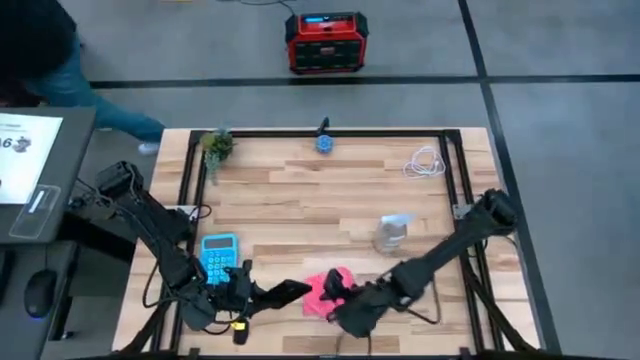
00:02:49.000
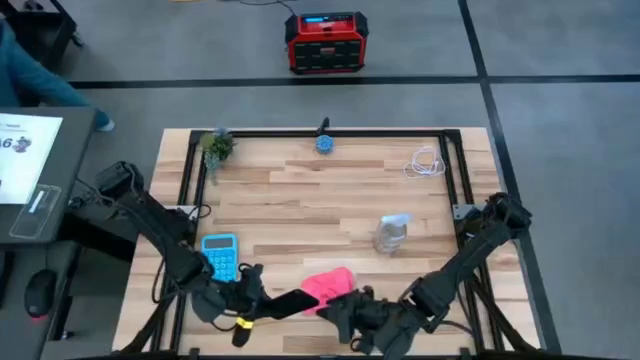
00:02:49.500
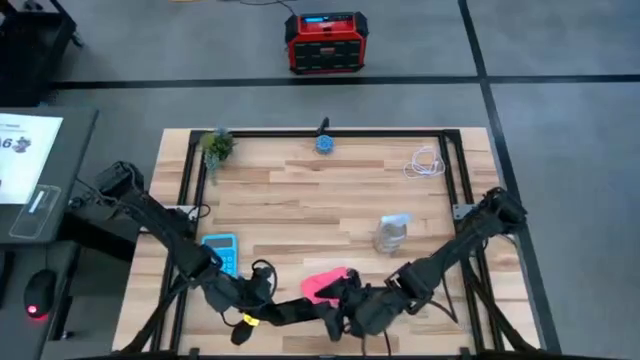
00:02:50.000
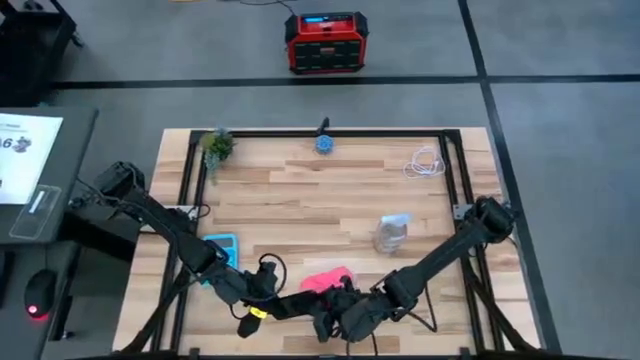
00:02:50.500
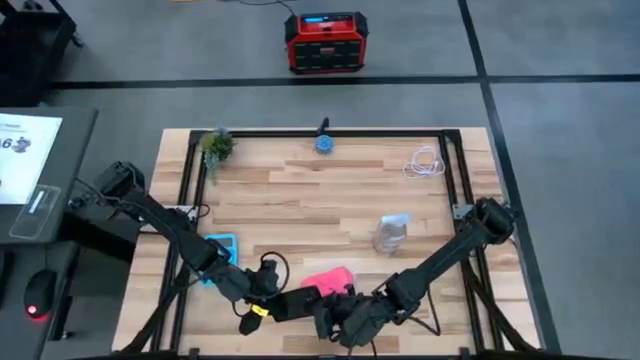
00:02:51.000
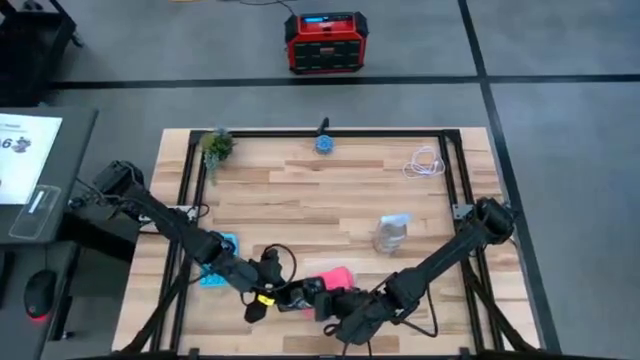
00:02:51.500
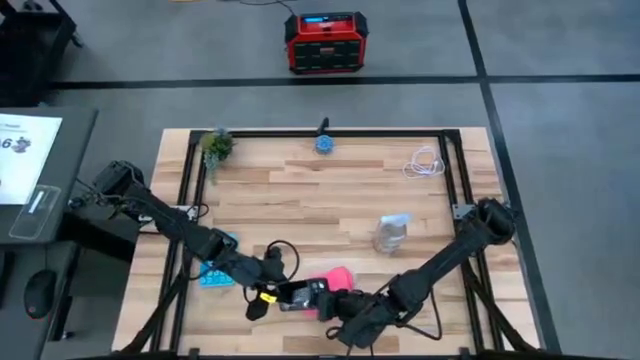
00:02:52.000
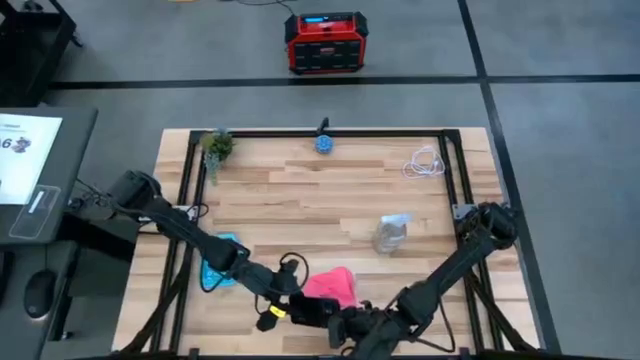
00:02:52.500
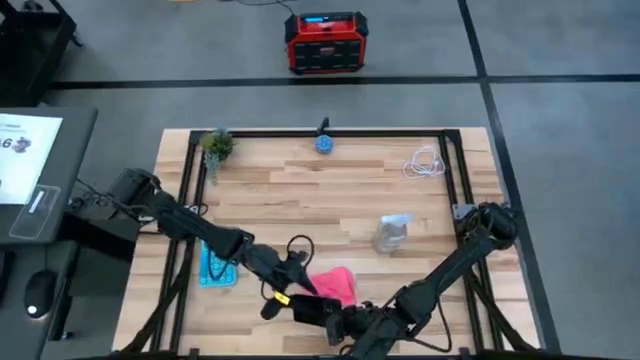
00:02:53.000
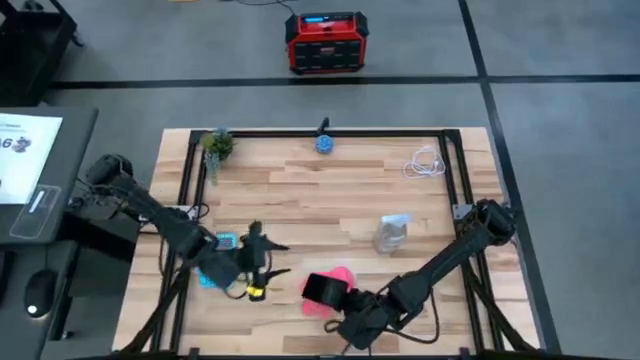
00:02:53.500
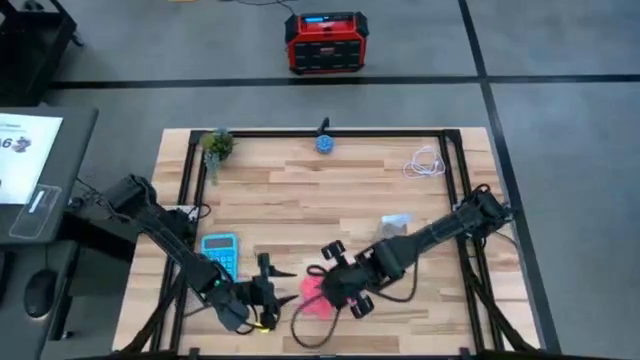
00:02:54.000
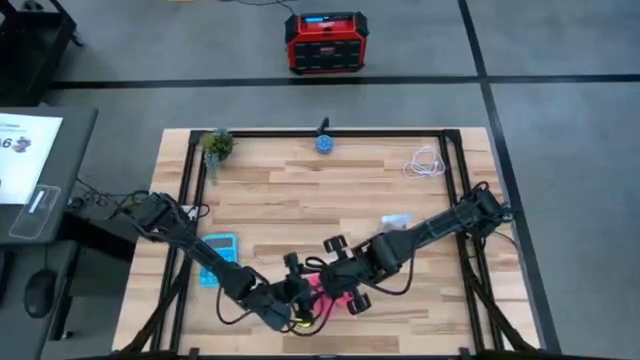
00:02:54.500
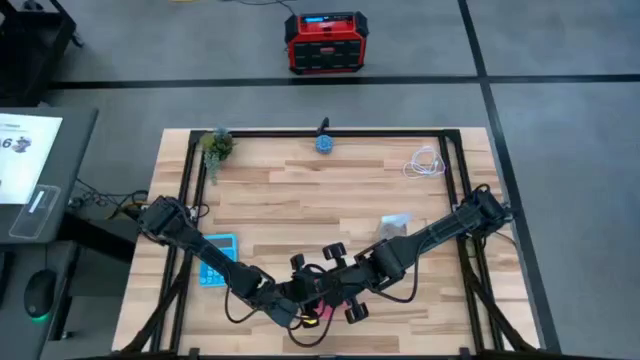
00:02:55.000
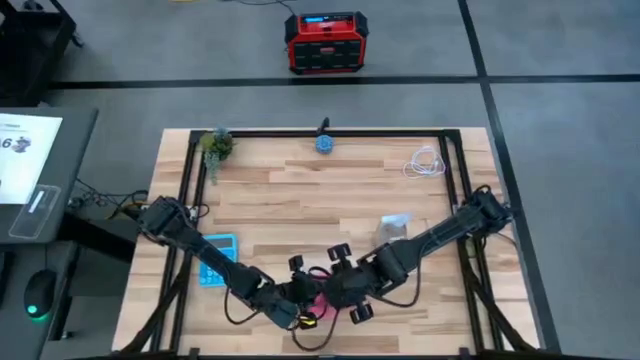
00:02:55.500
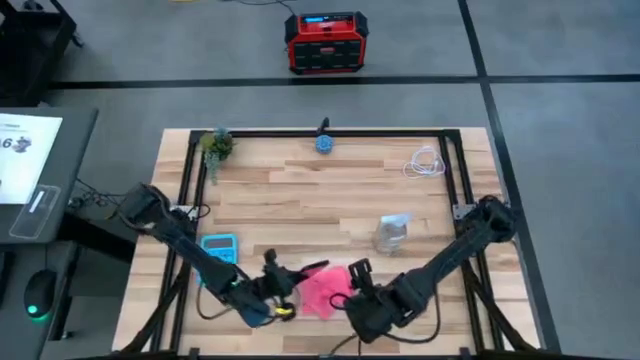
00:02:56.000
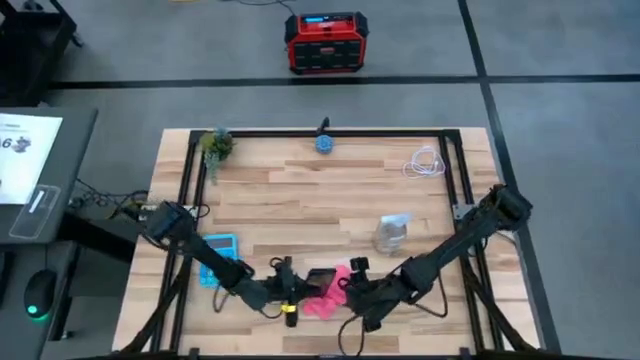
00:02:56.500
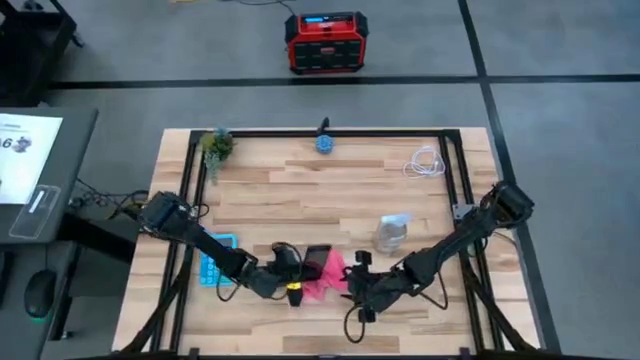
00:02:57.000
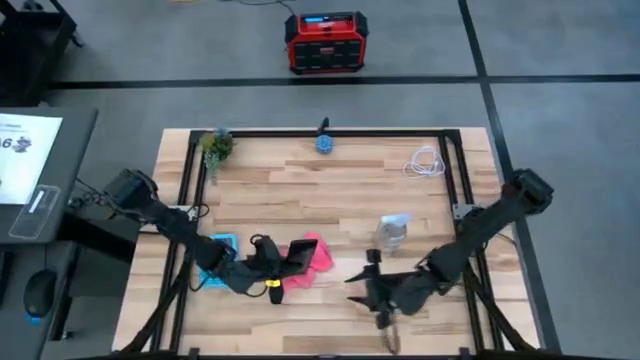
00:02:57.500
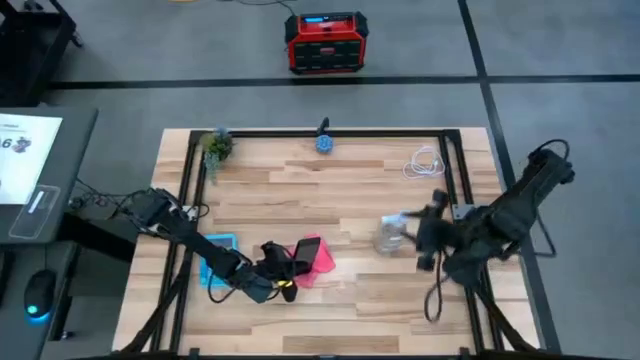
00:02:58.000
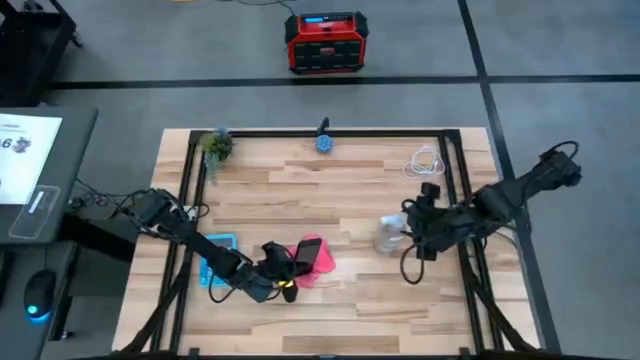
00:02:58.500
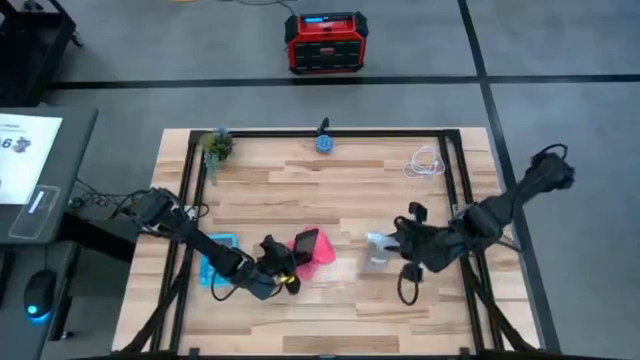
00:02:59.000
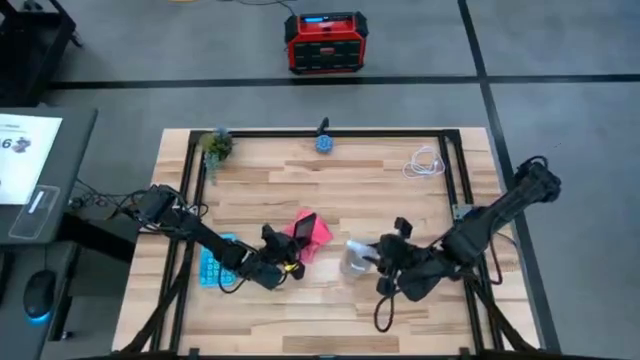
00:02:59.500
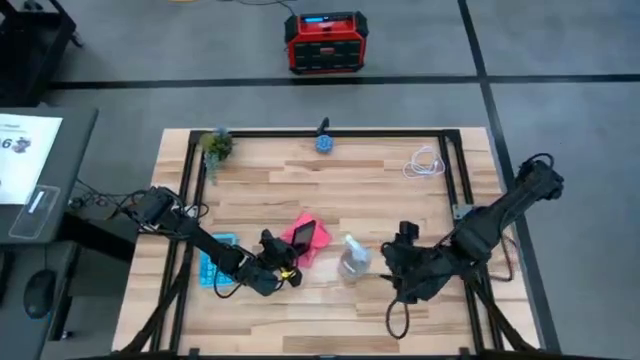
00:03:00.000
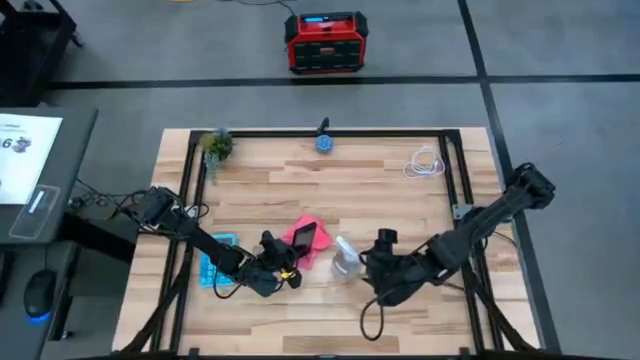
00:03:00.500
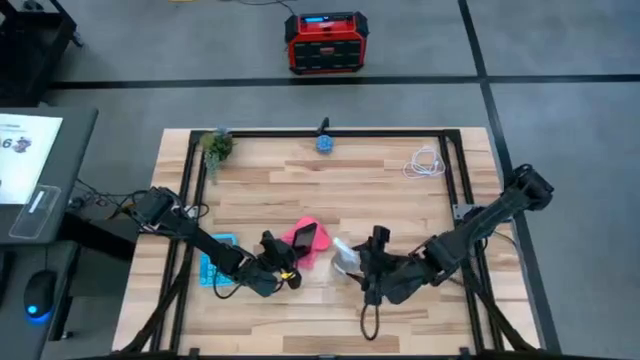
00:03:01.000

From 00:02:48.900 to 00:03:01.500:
Task: Apply microfiber cloth
Spray the front of the black cellphone using transparent spray bottle

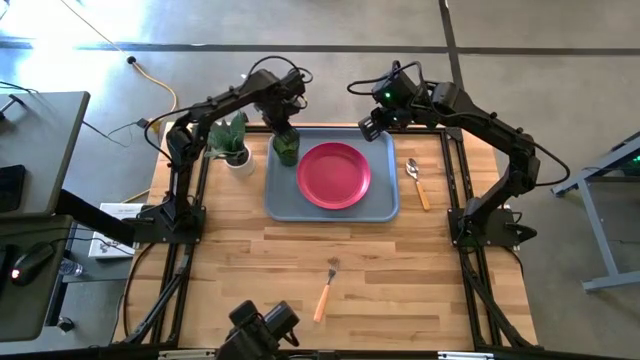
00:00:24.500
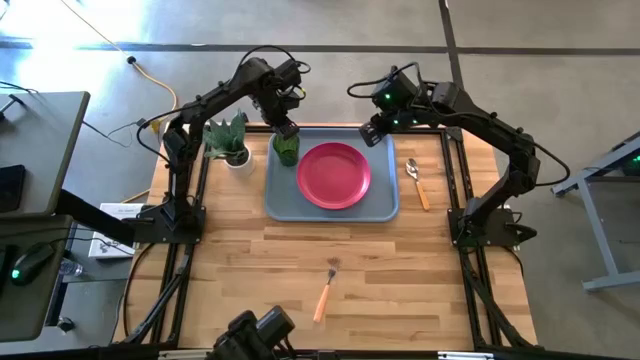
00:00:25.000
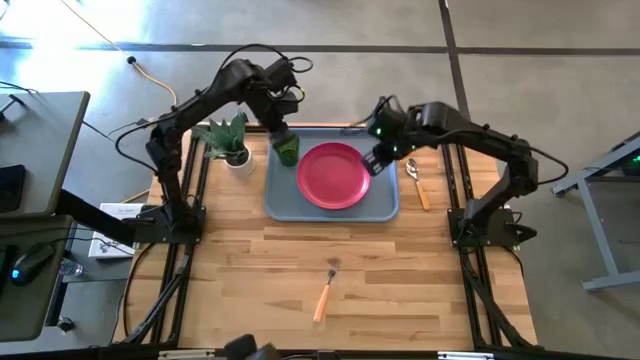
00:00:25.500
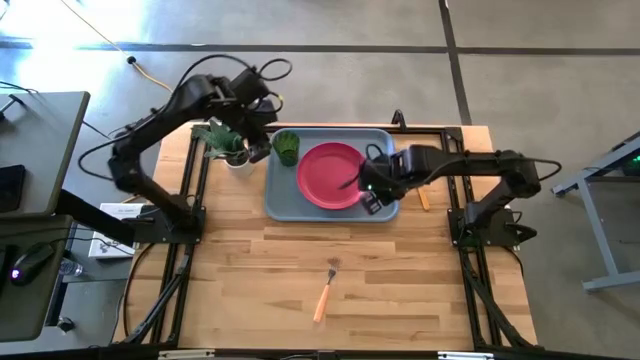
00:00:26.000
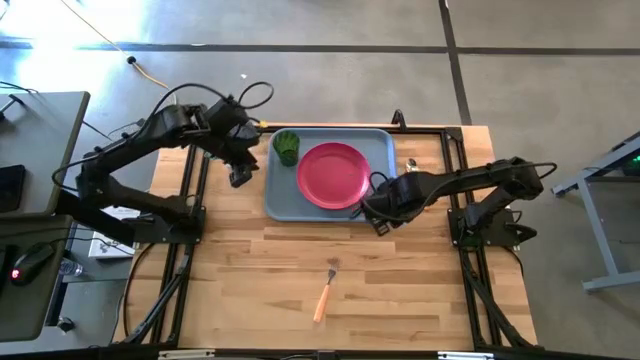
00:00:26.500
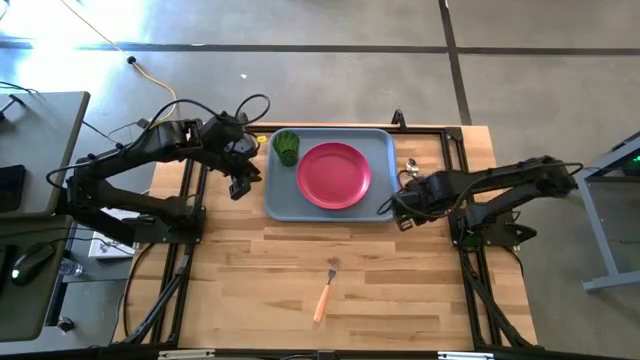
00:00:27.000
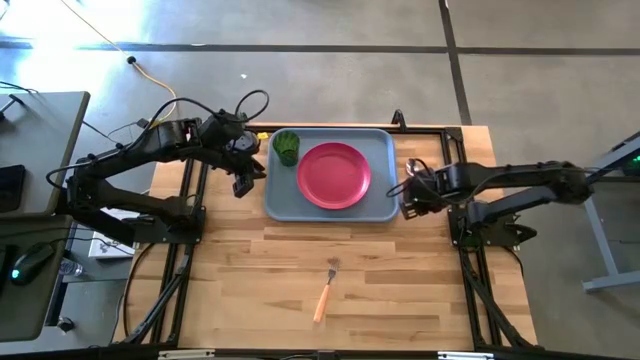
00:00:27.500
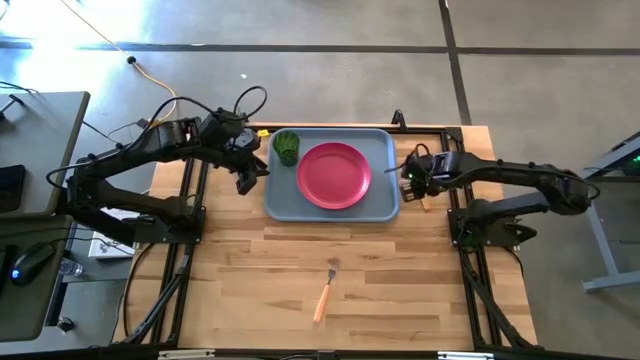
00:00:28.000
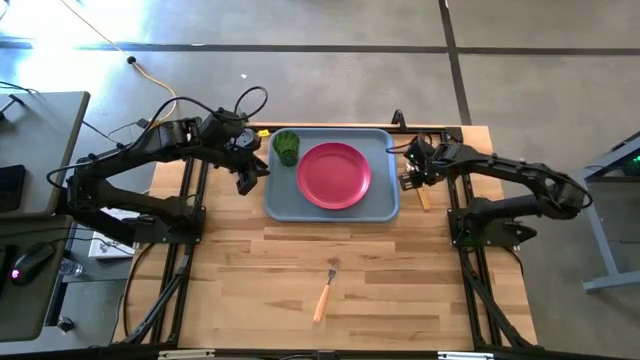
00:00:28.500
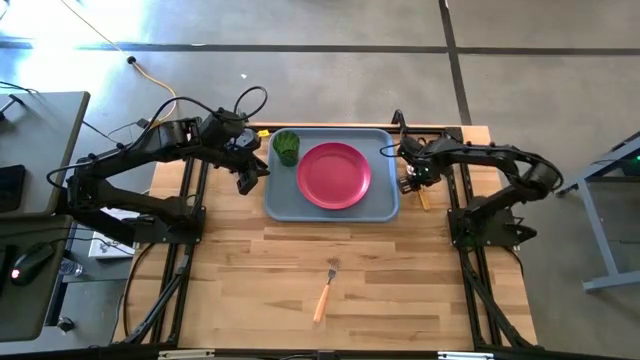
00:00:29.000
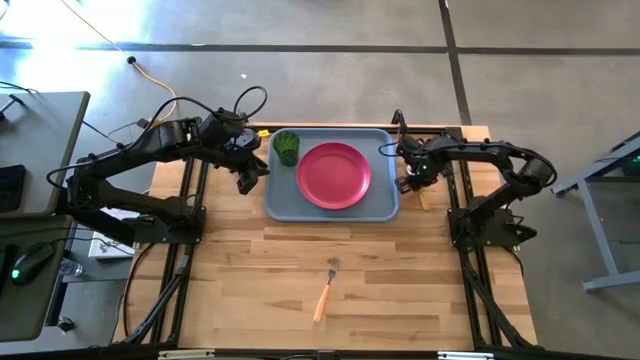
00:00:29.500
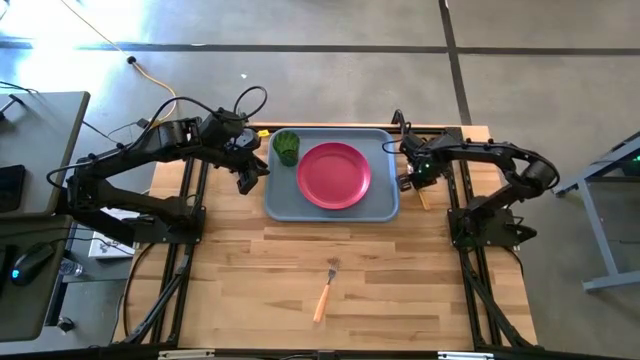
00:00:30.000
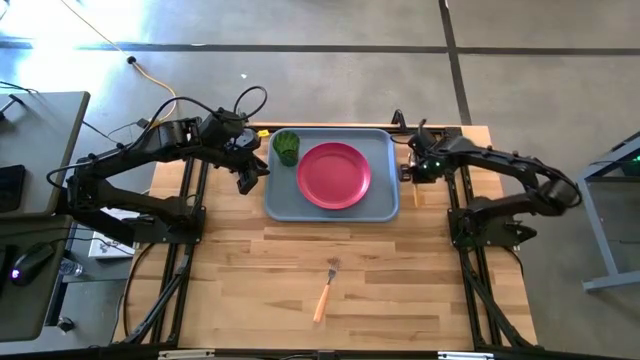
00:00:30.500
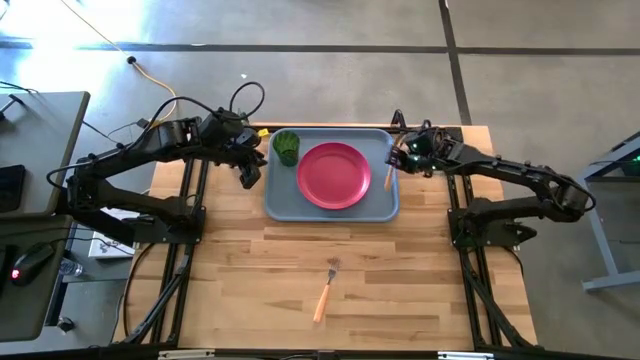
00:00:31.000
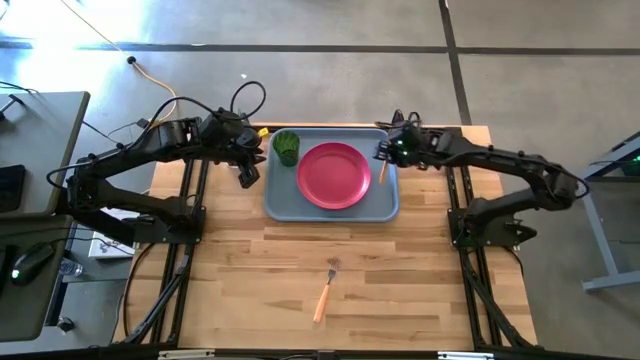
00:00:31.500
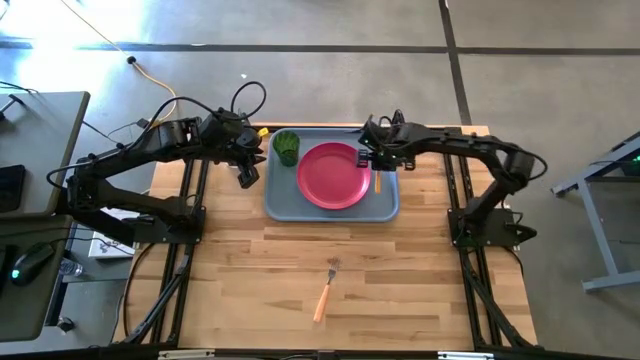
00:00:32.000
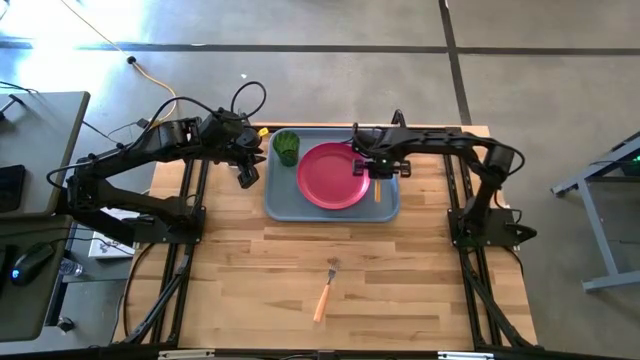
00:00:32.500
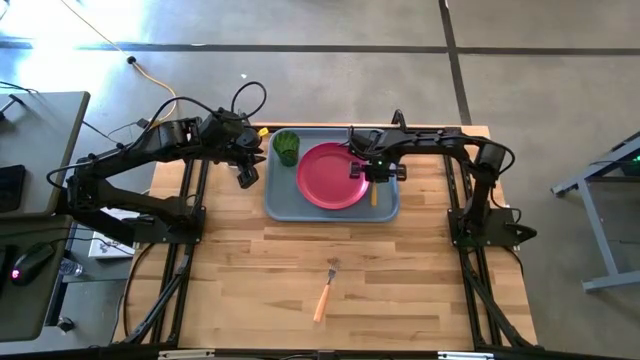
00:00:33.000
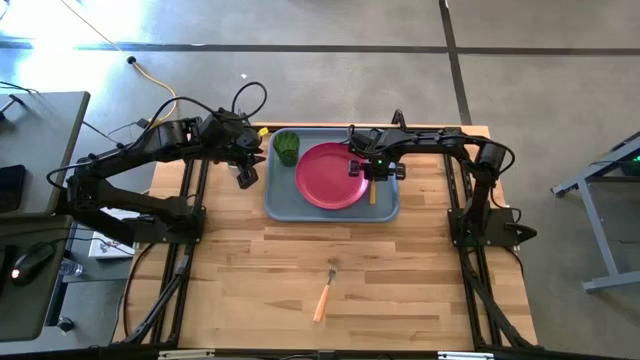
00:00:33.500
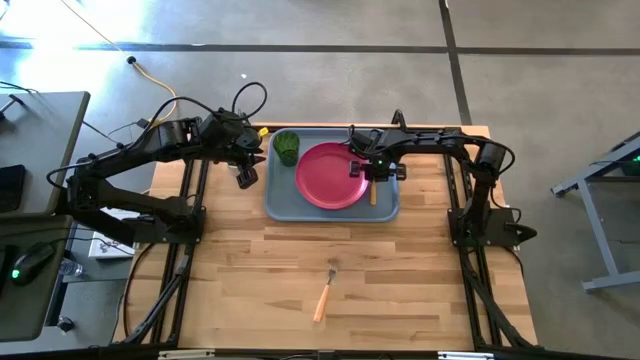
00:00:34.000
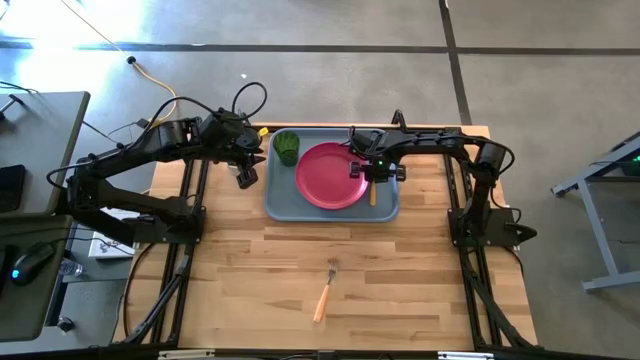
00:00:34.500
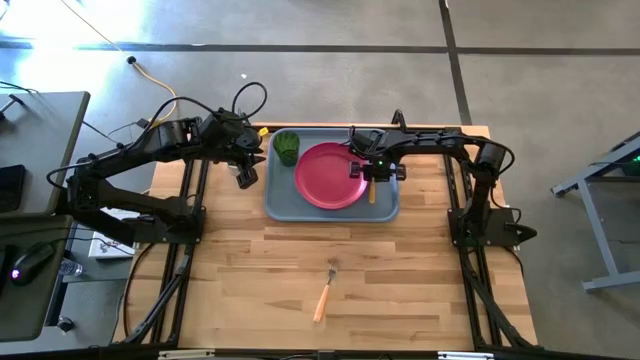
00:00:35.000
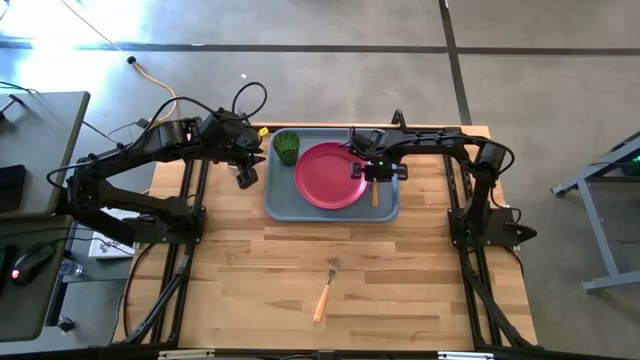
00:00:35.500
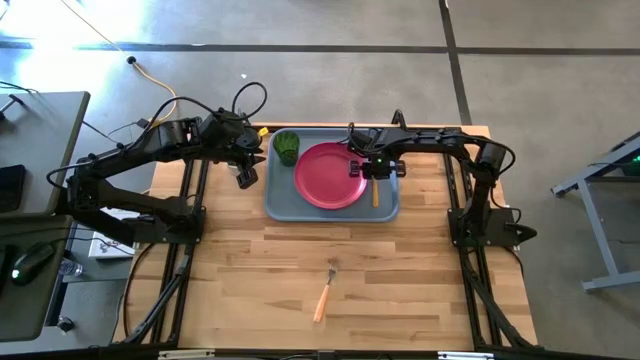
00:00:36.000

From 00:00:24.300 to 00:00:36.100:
Task: Pick and place plate/cup/fork/spoon on tray
Put the yellow spoon on the gray tray
